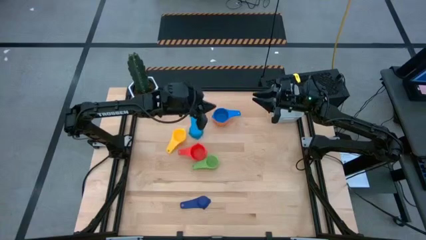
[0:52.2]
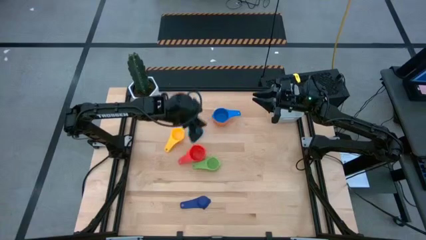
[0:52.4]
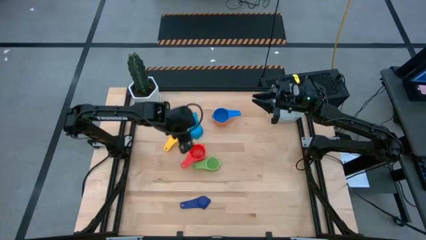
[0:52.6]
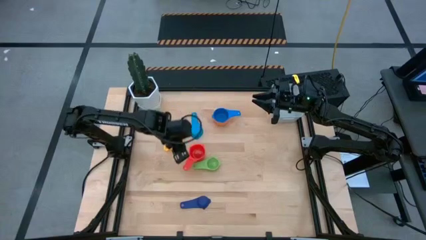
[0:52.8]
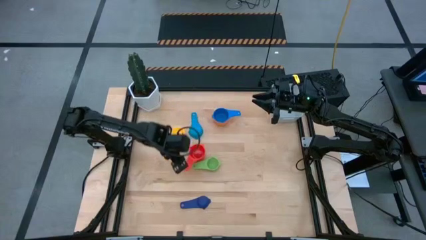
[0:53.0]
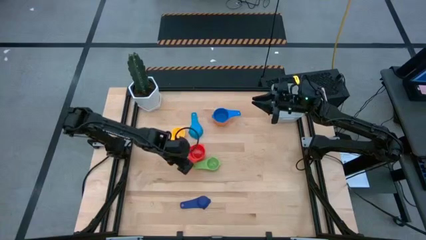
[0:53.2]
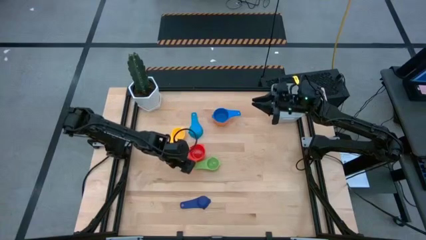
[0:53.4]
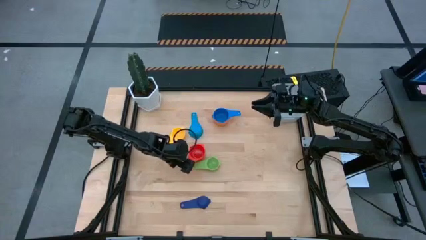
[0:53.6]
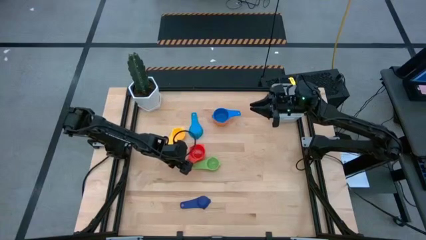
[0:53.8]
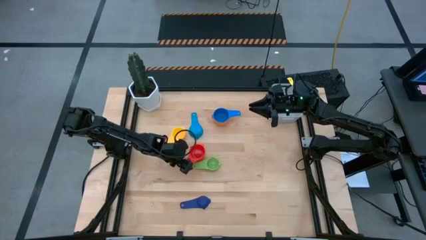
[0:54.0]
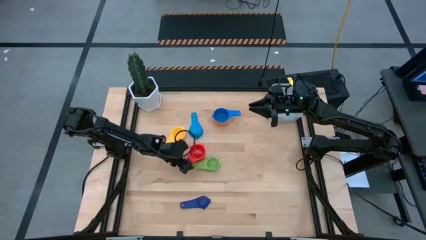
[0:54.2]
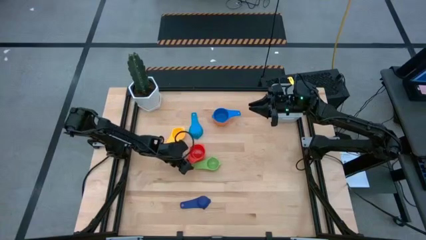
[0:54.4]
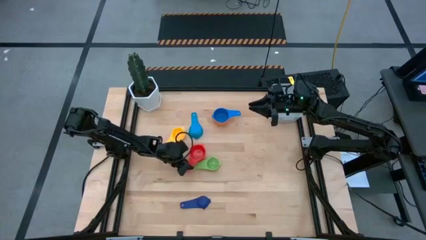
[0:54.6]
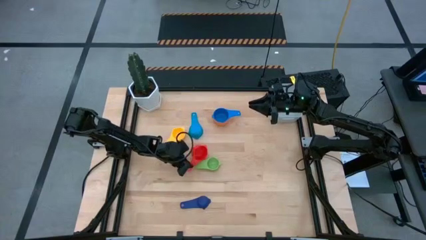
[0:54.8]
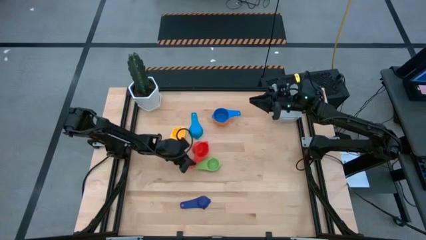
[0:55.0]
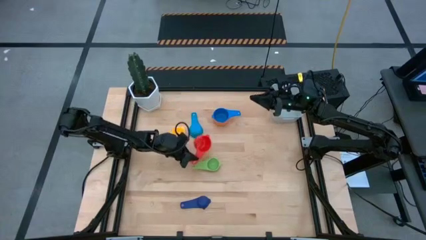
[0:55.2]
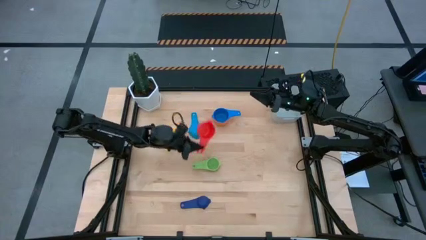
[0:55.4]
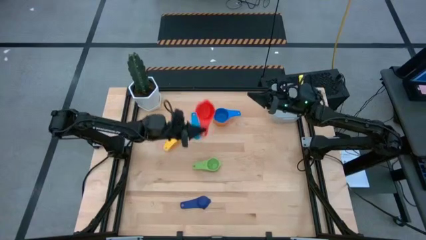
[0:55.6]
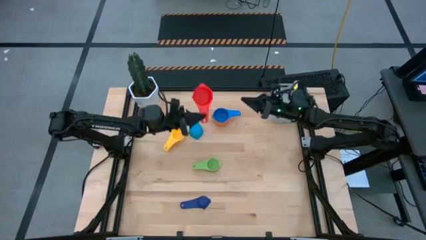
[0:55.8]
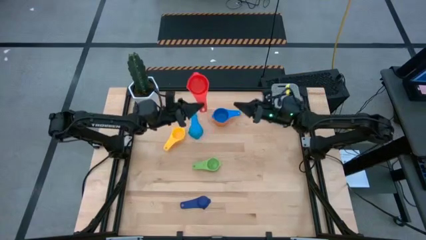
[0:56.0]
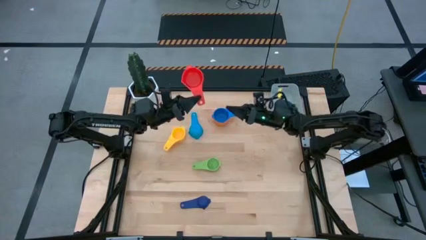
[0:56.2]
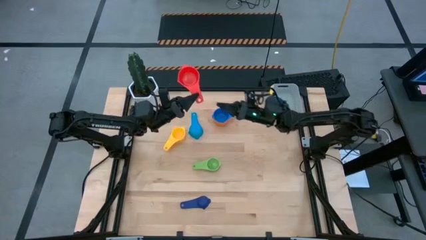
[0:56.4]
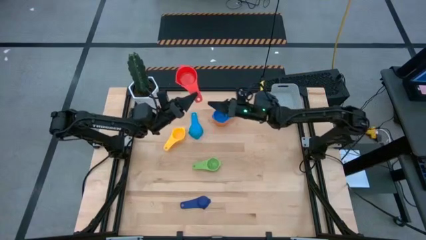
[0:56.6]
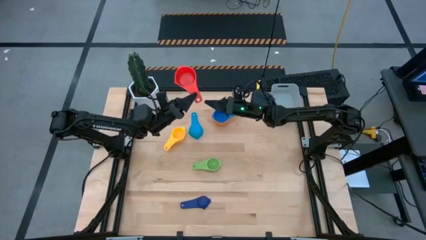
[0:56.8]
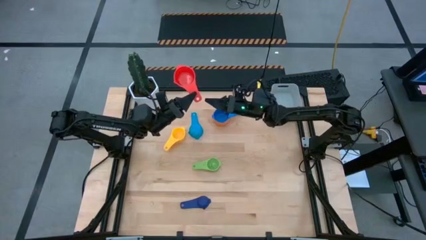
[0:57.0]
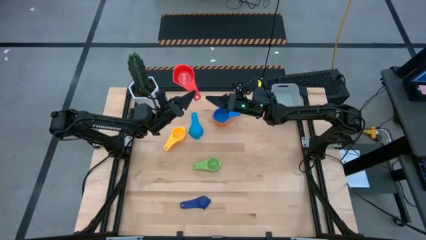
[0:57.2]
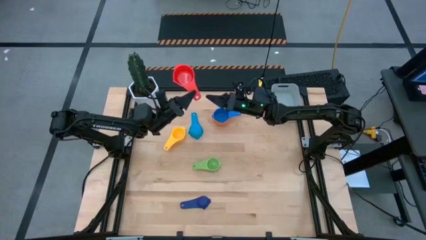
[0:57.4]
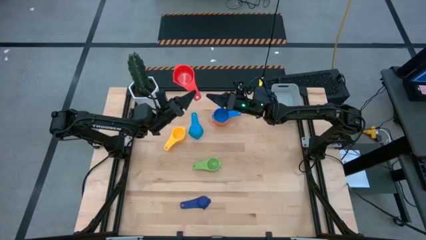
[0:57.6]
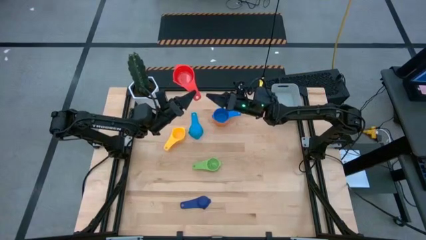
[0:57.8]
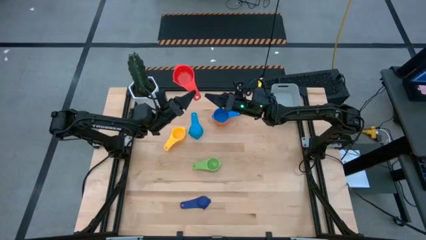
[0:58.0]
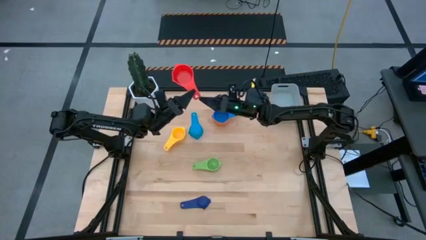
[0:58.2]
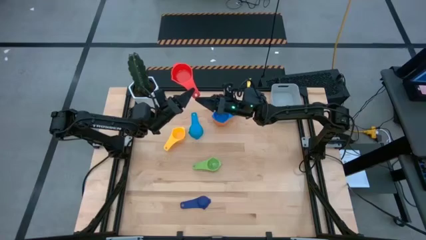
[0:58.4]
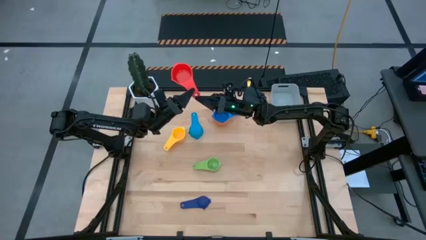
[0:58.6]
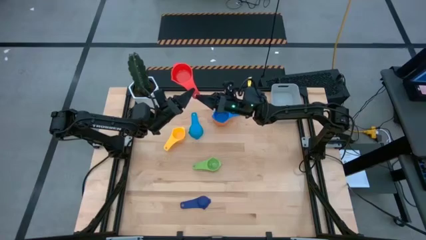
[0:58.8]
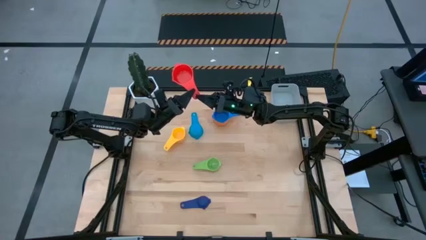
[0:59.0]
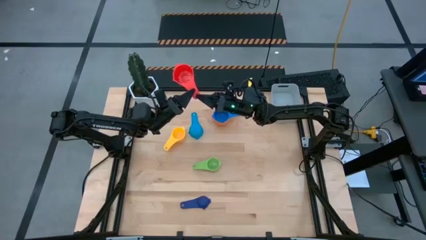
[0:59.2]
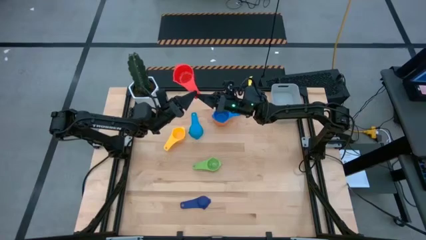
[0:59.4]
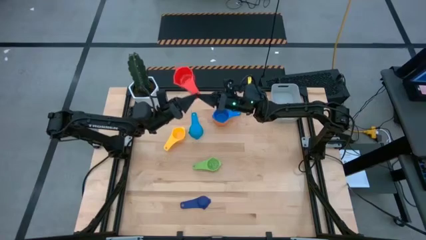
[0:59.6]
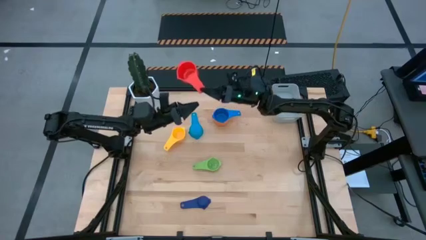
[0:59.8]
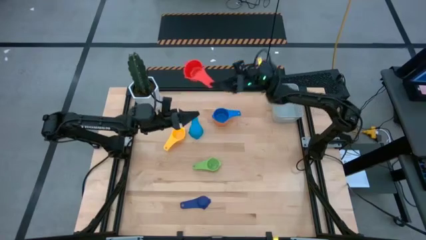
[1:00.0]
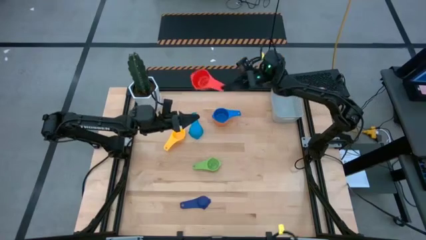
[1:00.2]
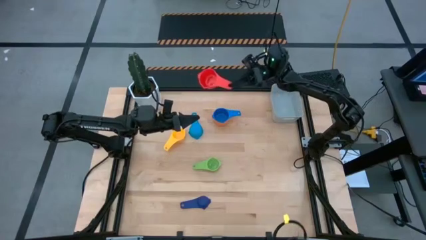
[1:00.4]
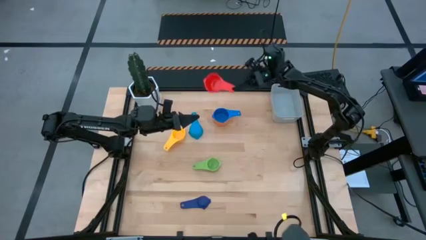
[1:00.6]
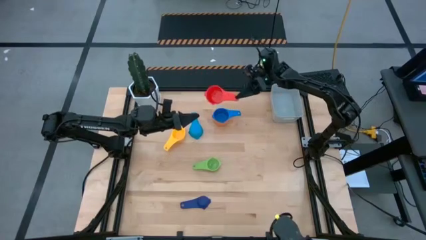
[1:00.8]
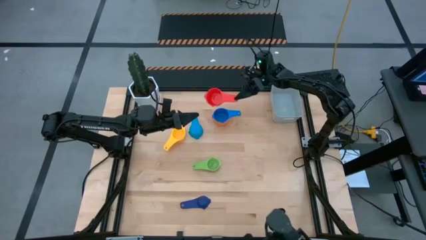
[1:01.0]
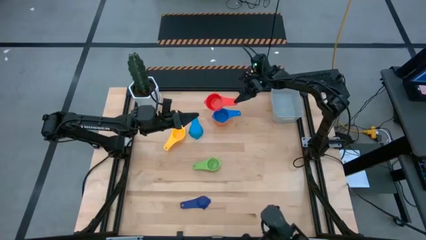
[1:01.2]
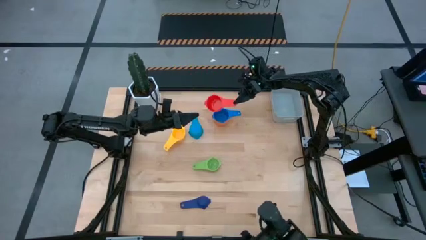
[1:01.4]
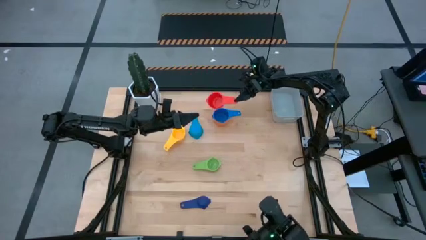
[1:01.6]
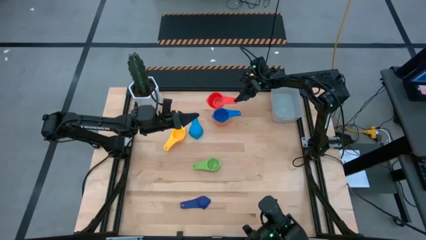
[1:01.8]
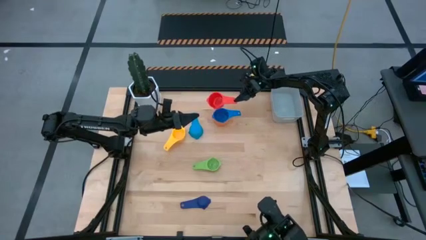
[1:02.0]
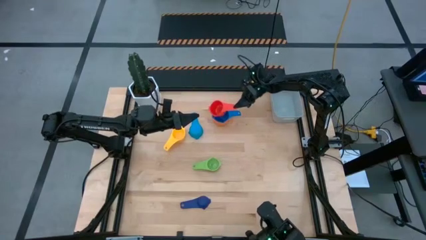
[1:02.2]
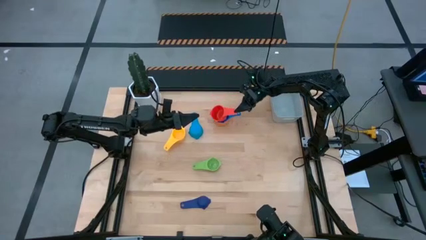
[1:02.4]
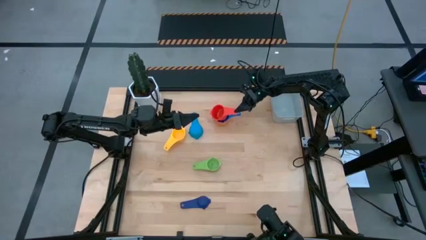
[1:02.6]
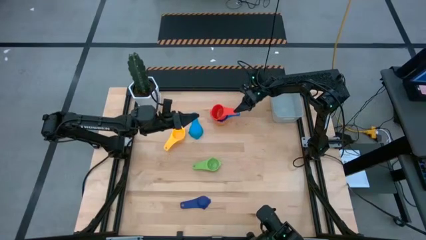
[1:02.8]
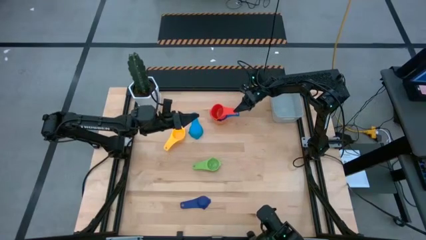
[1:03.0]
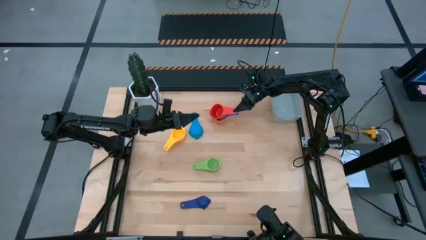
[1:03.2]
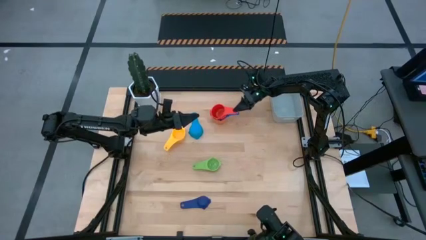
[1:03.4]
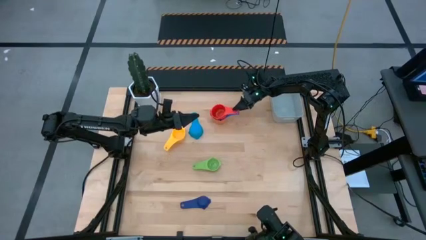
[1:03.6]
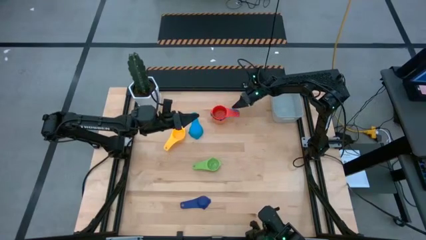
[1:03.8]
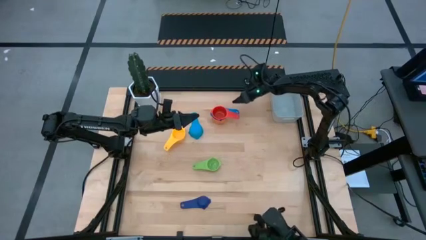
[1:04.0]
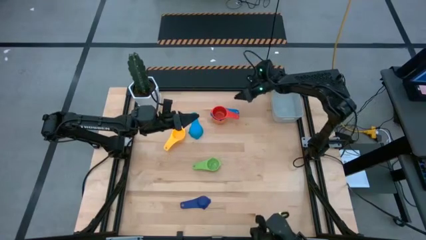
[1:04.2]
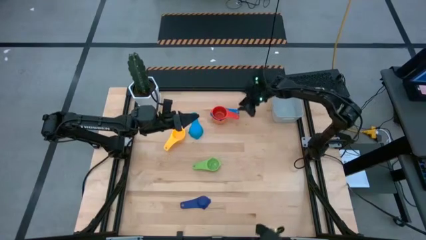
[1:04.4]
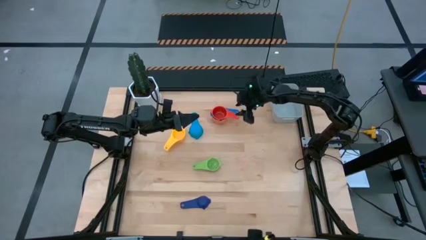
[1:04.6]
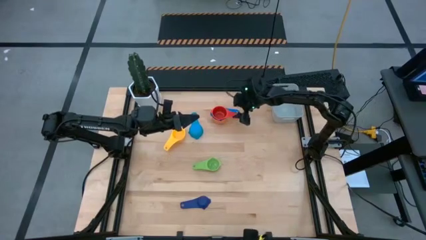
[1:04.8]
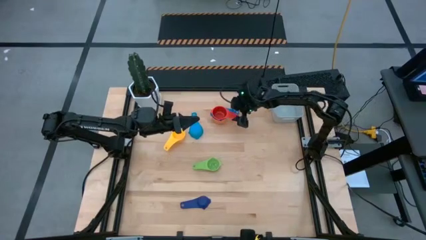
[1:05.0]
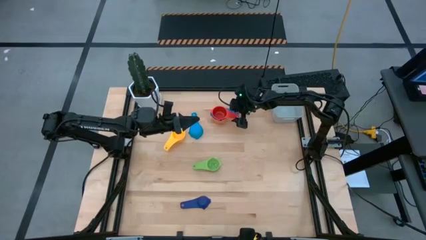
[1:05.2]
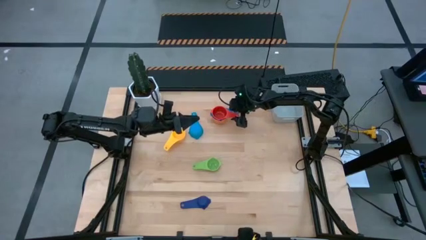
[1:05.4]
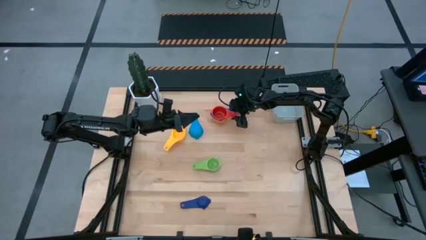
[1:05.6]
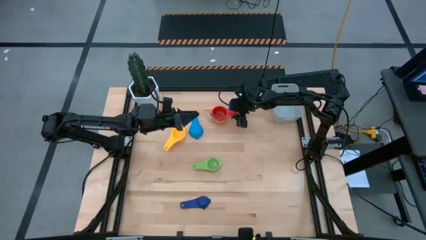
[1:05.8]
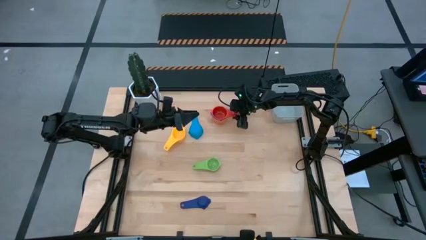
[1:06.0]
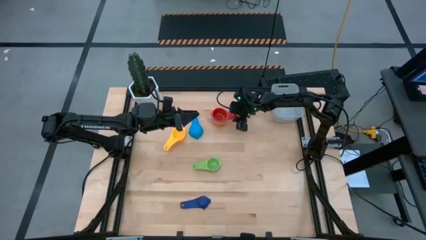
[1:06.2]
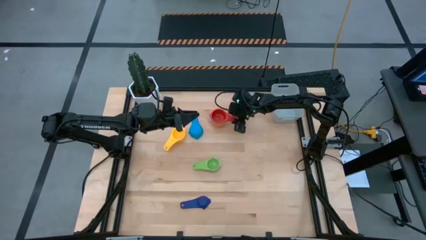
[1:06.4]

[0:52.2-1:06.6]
Task: Nest measuring cups in basket
Stack the red measuring cup on top of the blue measuring cup

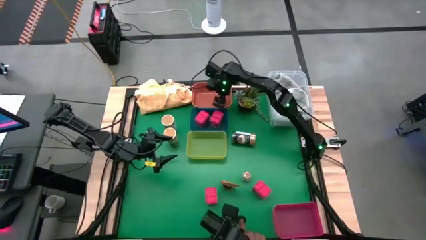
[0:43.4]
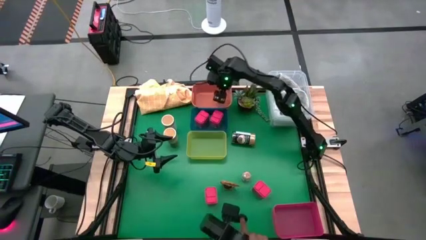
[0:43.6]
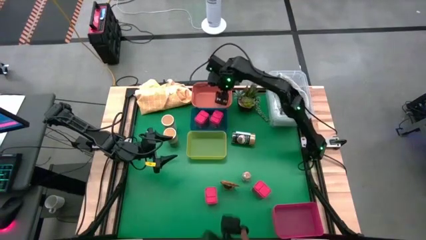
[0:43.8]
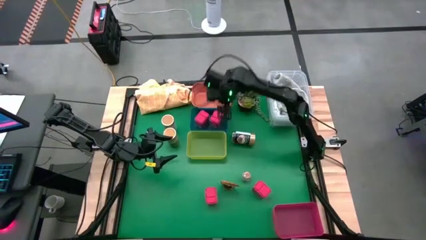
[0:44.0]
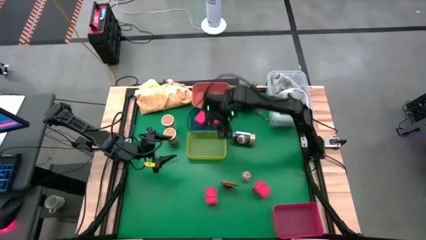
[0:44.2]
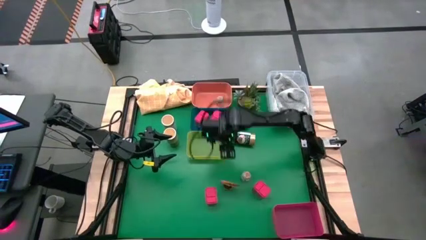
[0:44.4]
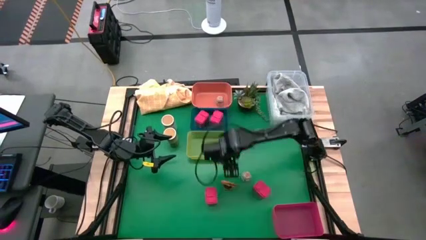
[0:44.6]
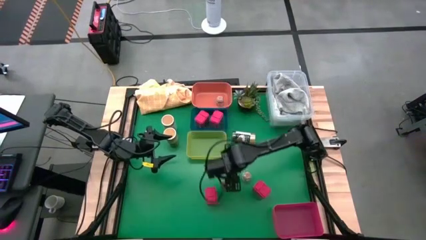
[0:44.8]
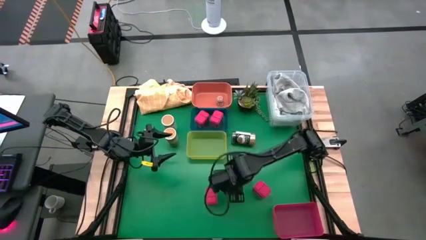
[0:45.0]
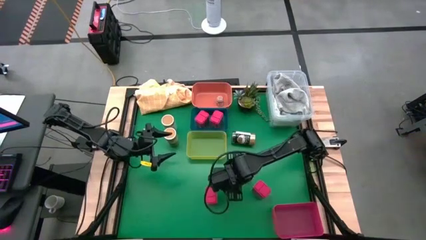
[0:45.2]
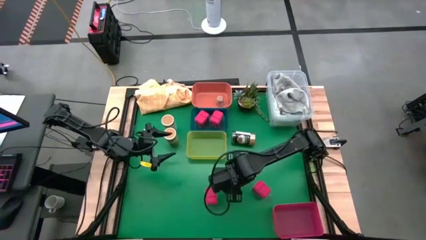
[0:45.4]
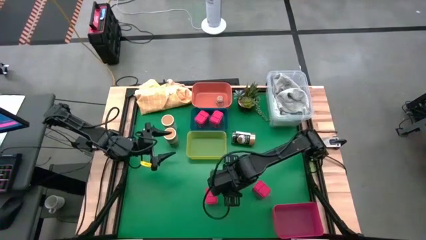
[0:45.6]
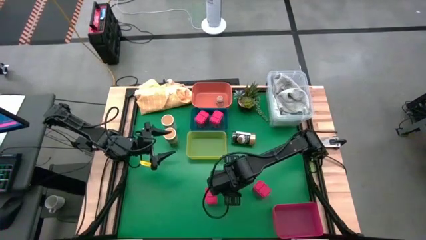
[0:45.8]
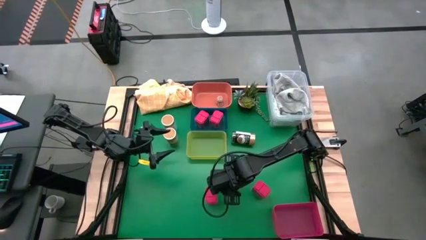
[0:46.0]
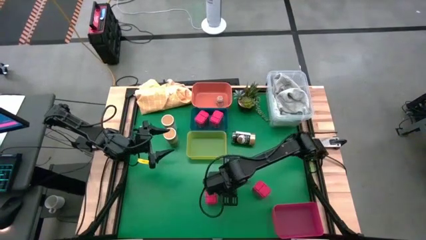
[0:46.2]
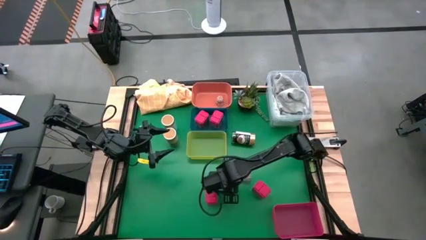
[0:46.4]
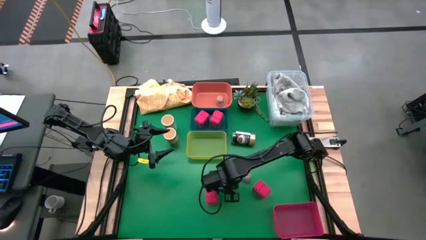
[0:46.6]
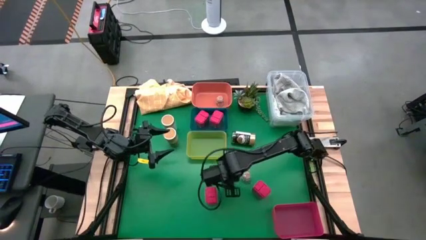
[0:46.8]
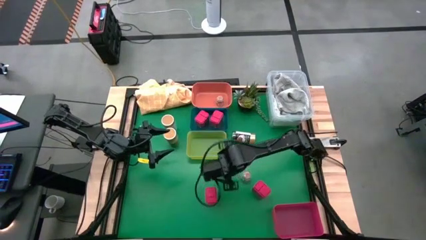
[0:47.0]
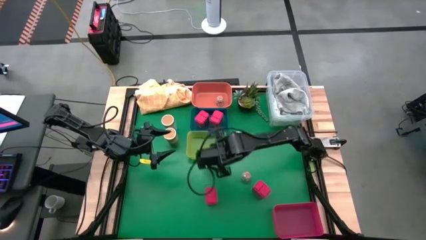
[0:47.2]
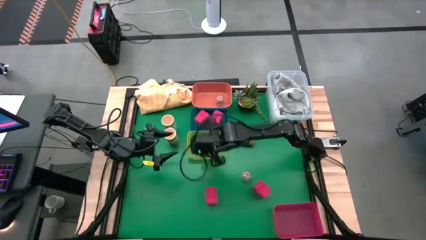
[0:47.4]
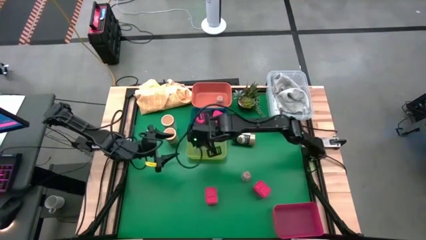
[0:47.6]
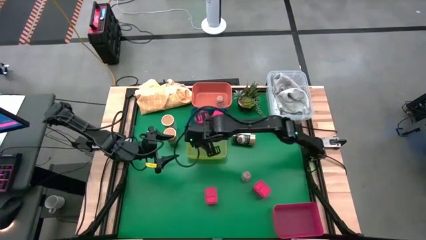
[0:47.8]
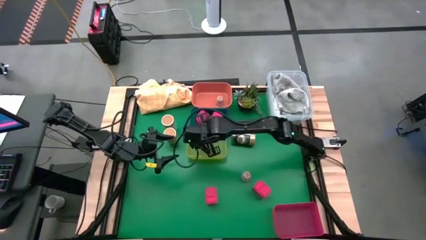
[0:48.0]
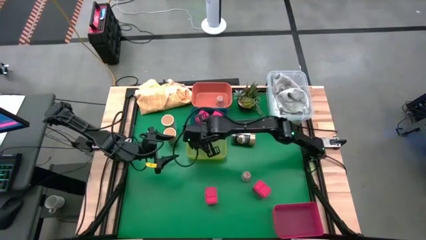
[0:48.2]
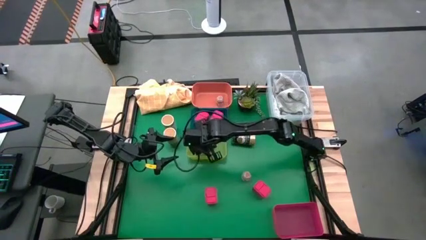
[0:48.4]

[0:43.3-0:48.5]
Task: Sort spices by type
Put the orange seasoning pack into the yellow bin
